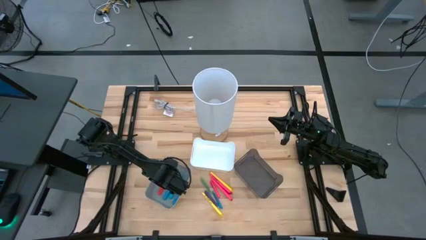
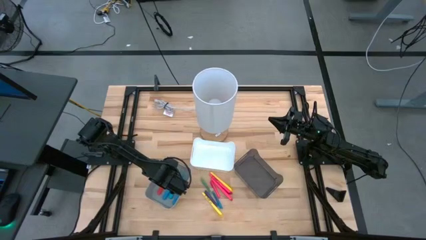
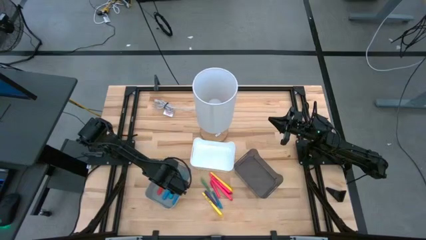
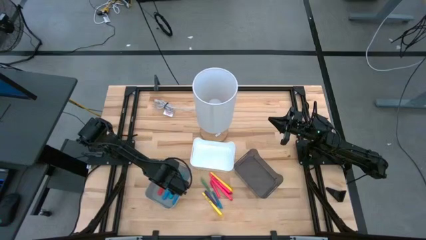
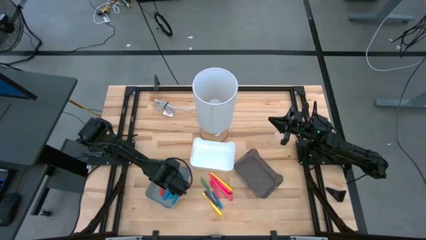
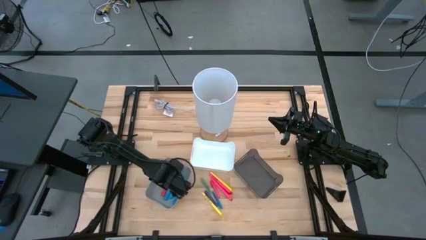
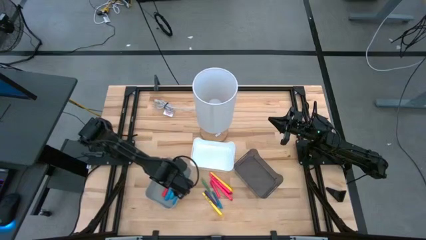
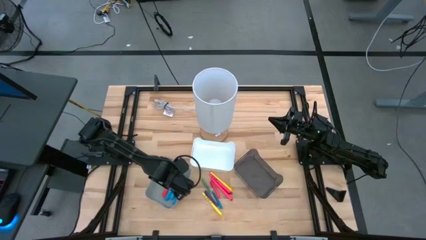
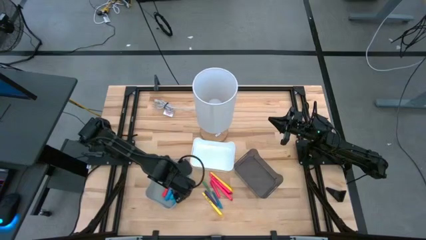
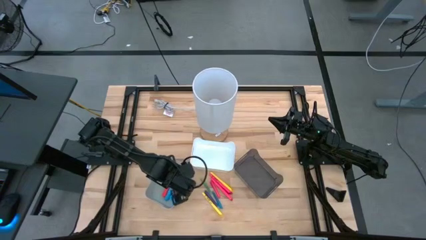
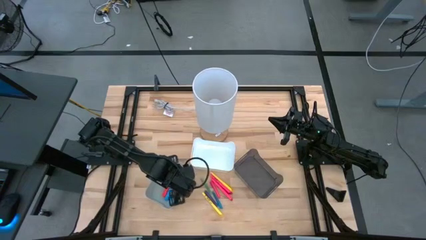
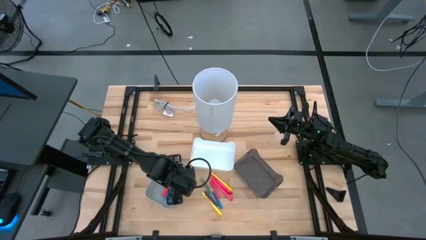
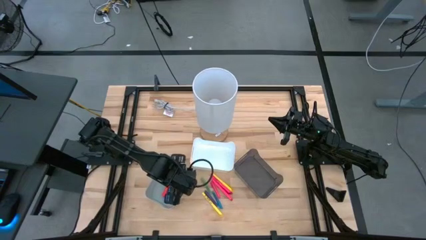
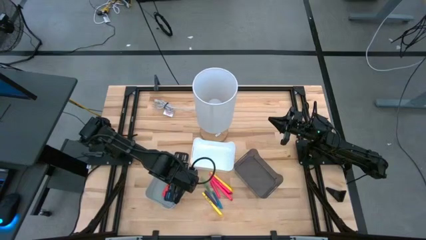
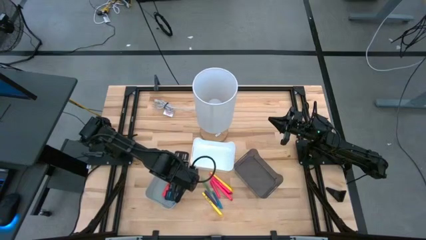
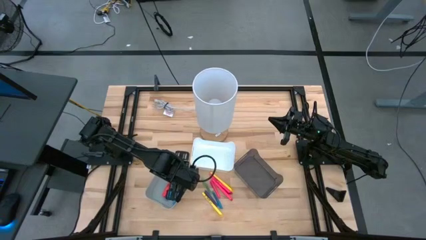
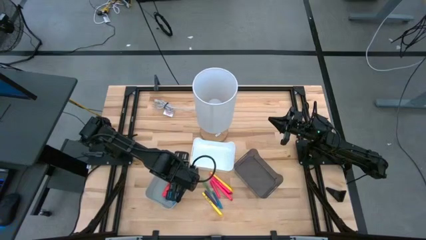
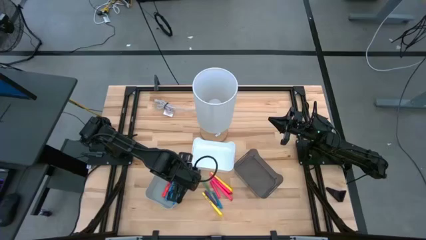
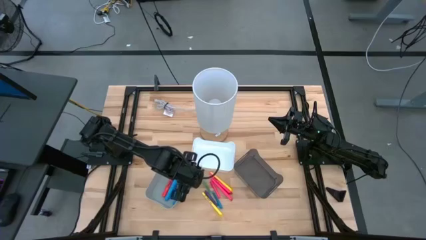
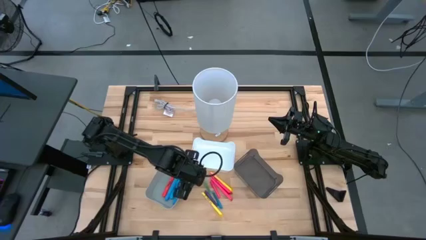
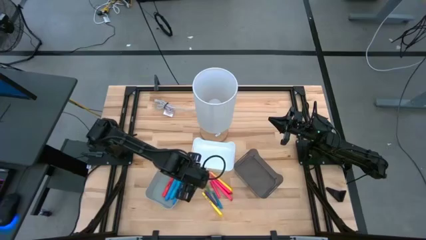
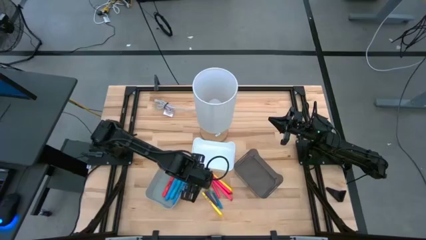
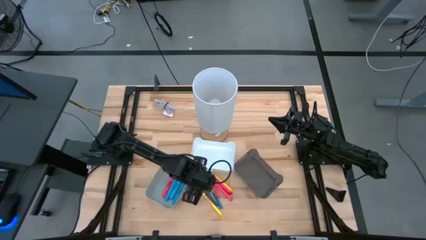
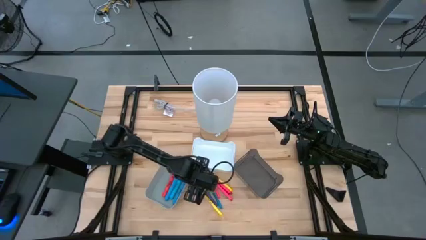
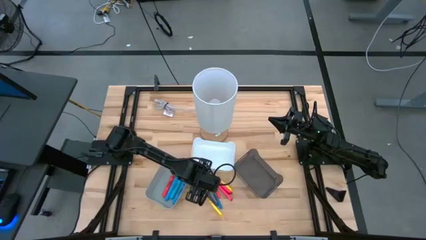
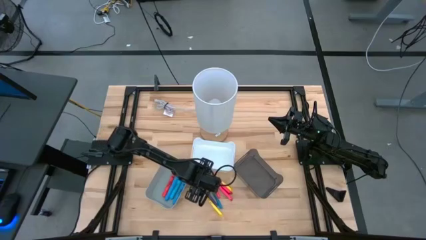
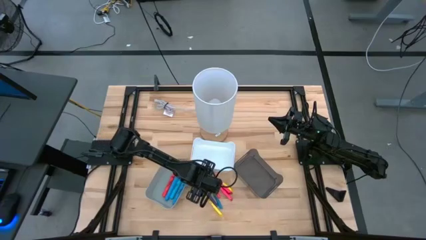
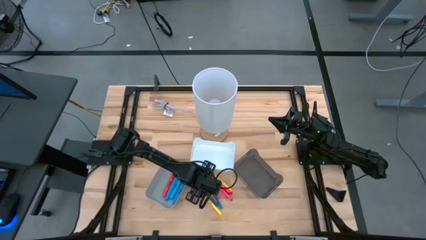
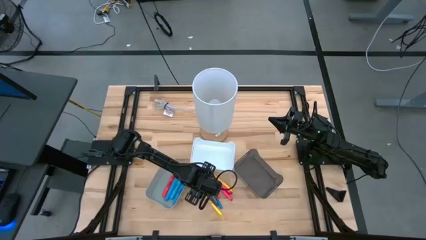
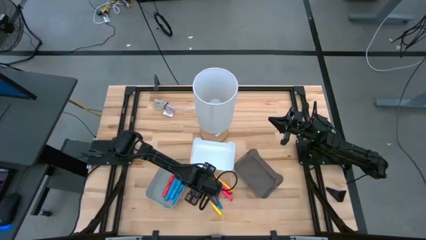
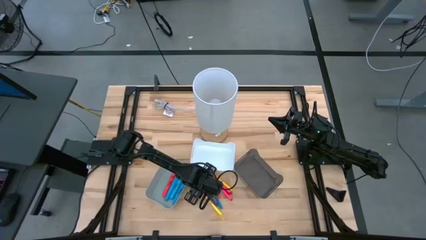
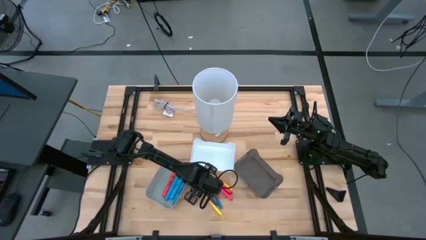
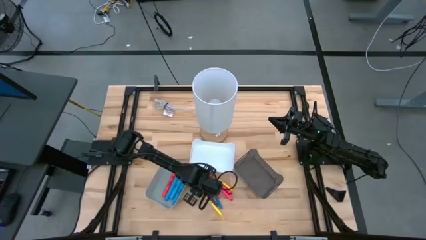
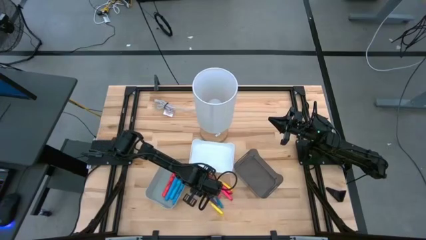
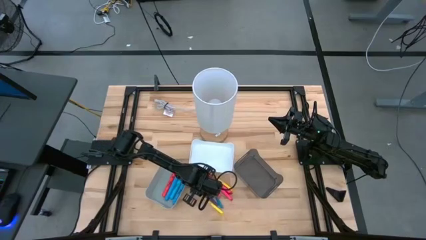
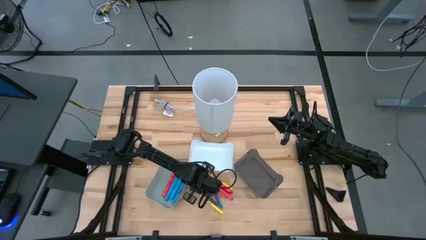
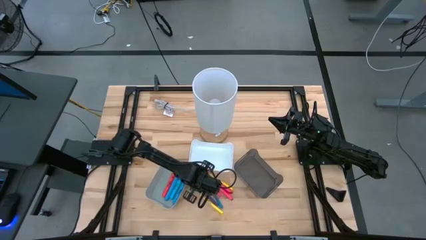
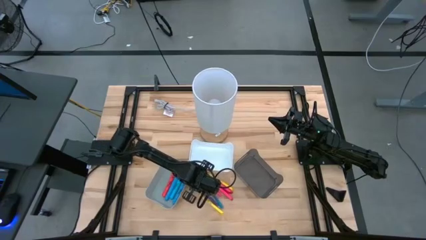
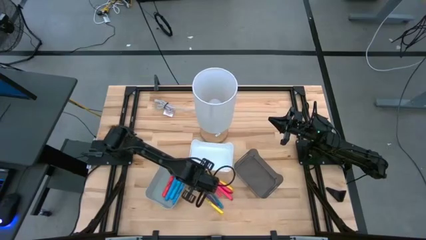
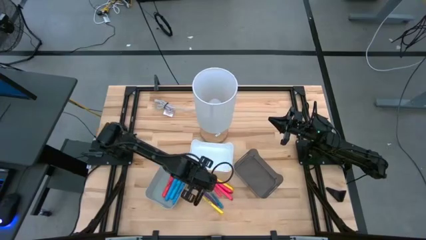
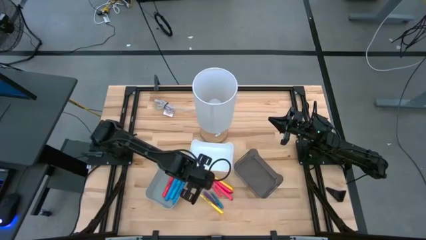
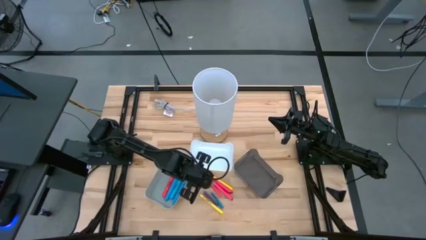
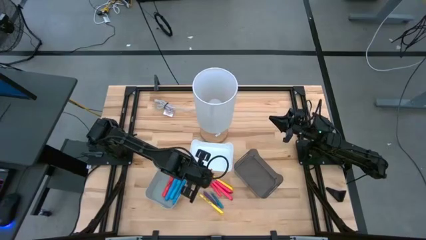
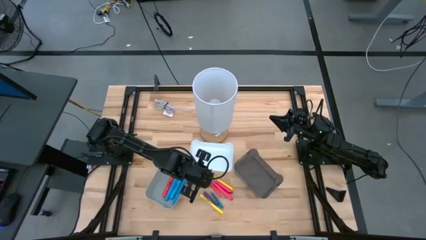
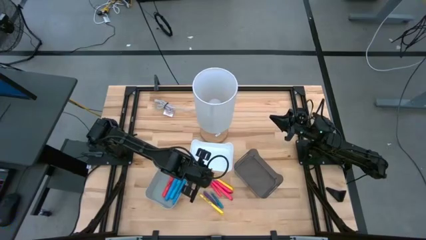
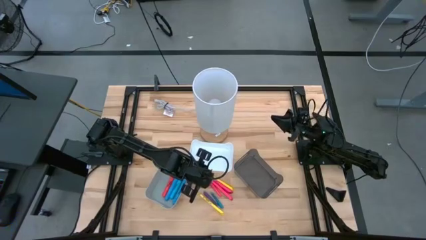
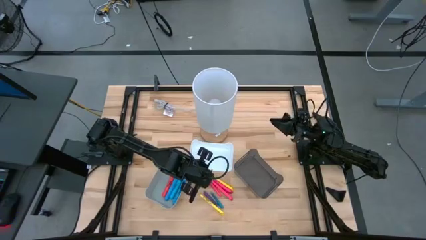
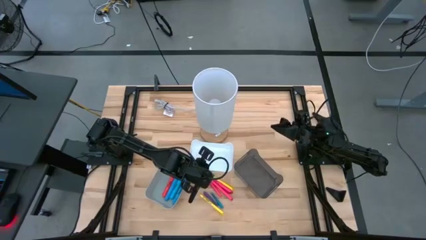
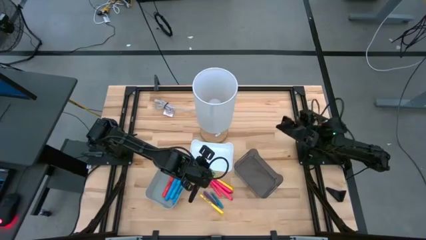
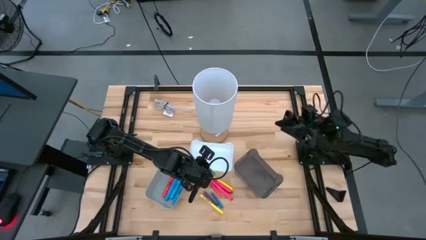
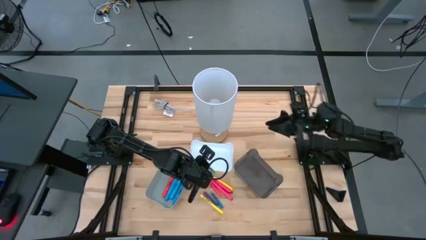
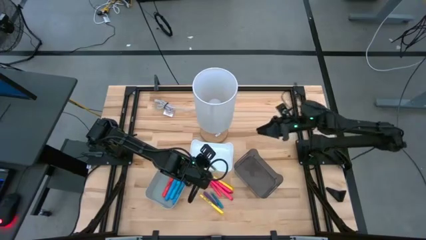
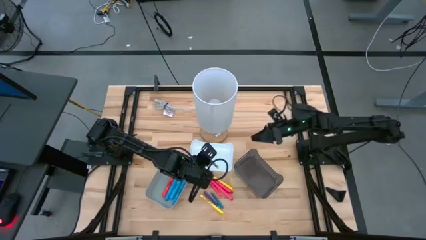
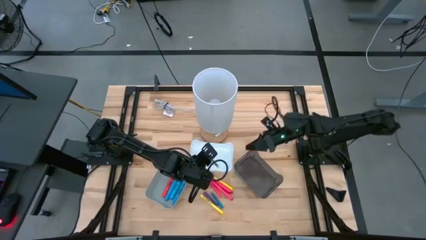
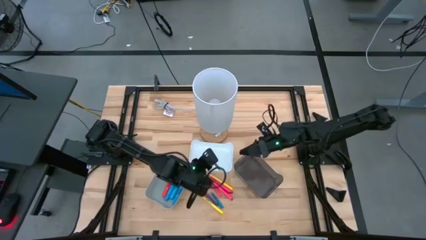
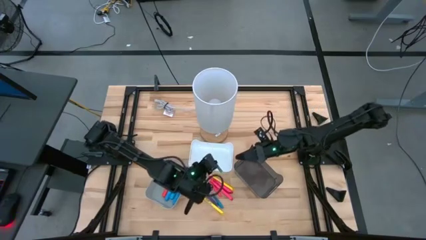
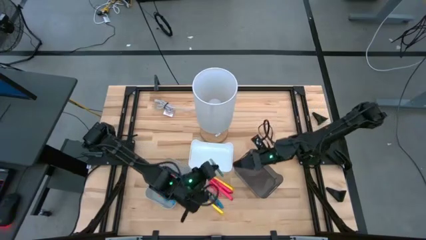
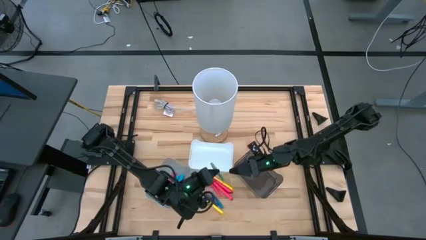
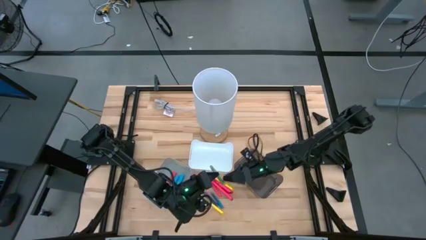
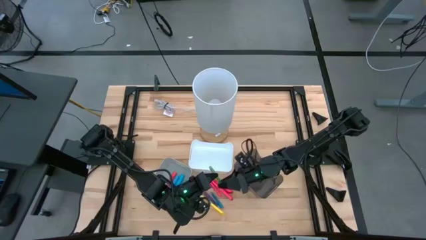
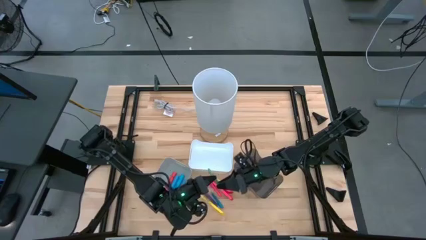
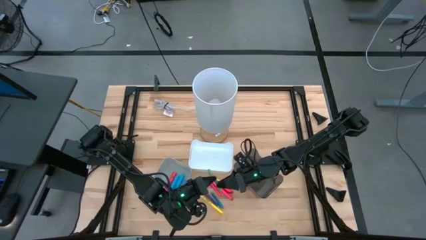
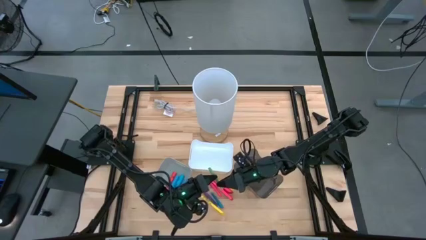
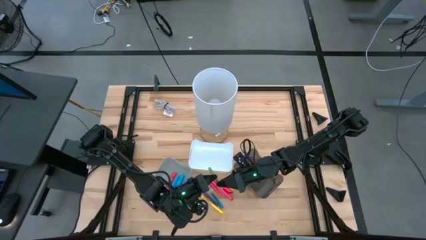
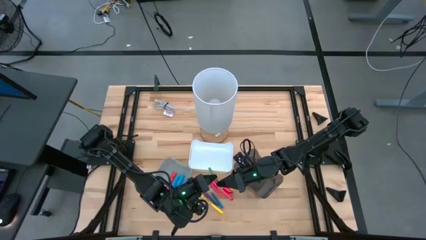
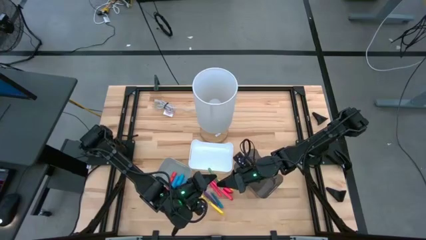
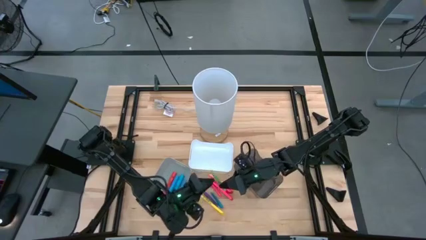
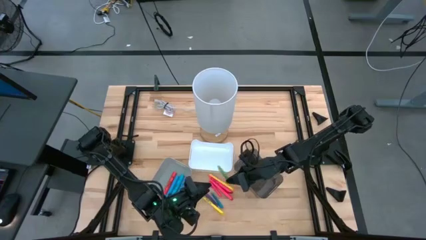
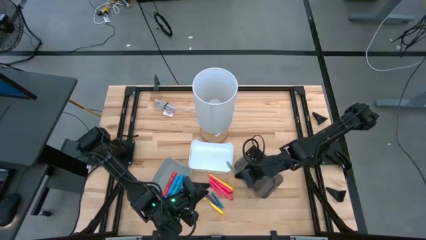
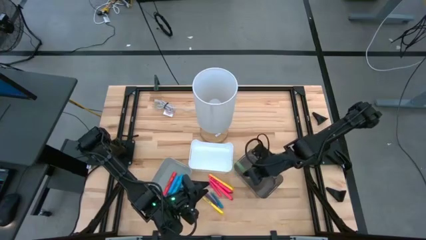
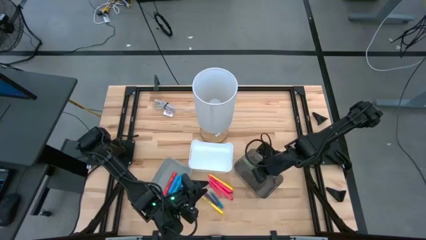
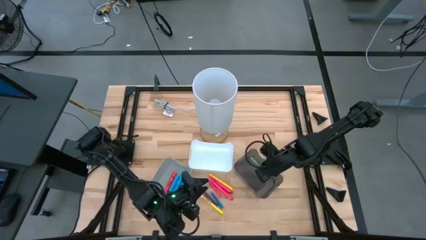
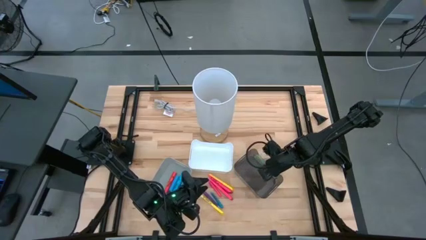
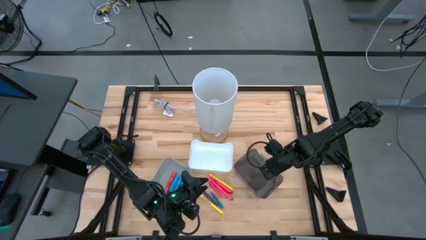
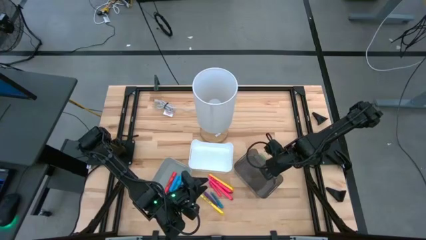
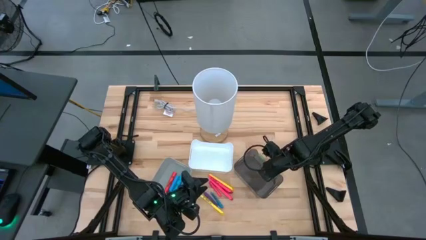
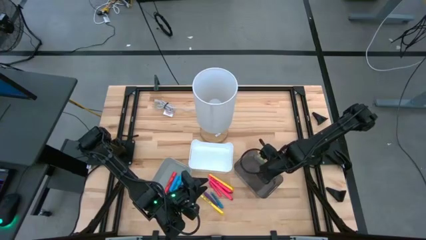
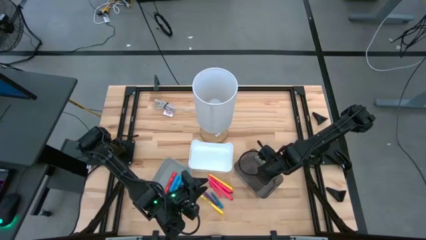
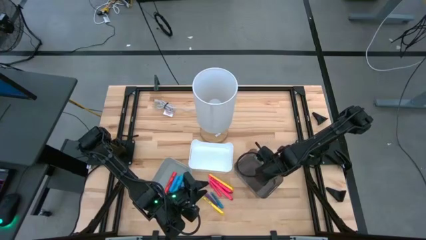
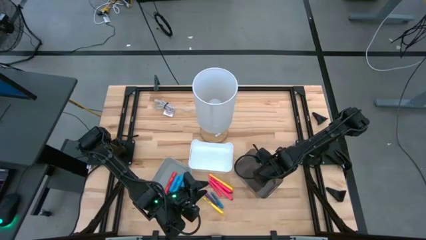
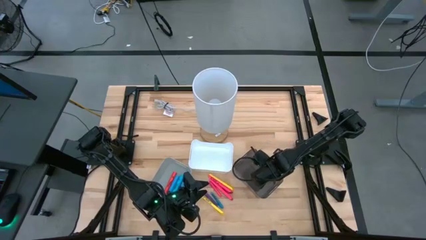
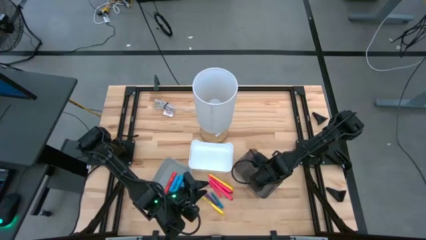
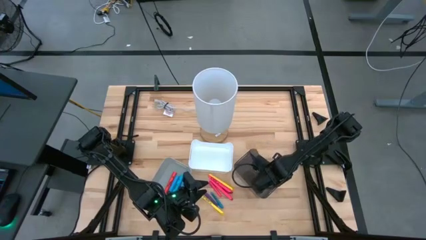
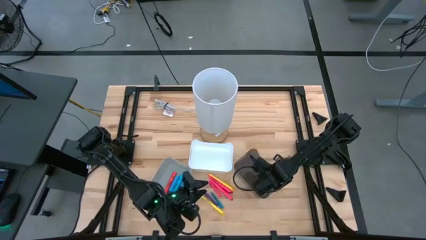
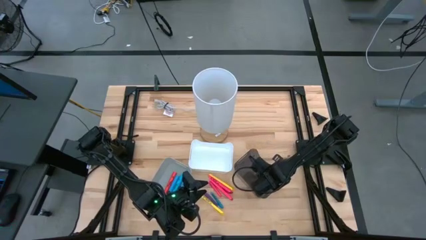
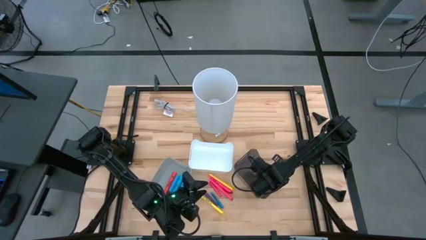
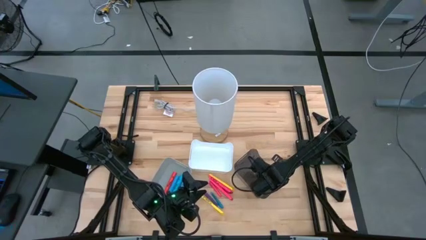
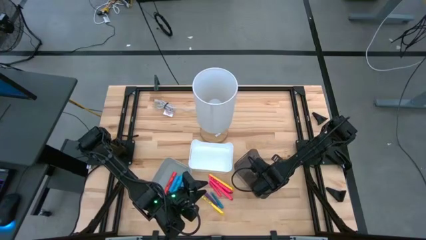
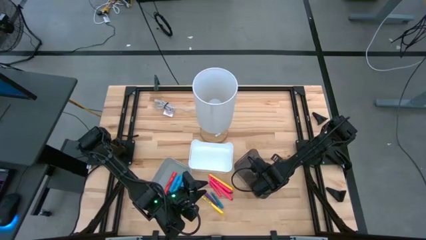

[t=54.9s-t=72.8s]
Task: Pick & Place Markers
Put the green pen in the black bin
